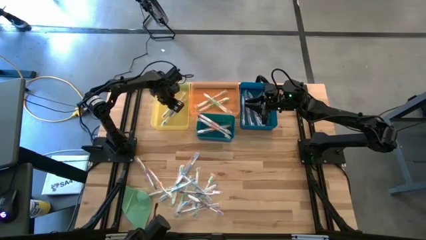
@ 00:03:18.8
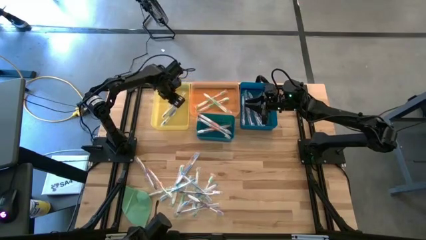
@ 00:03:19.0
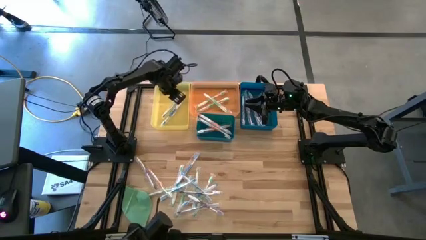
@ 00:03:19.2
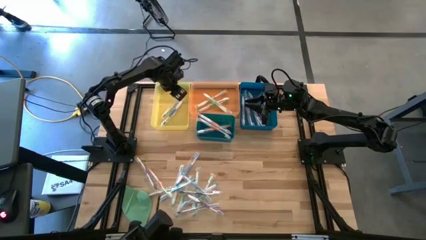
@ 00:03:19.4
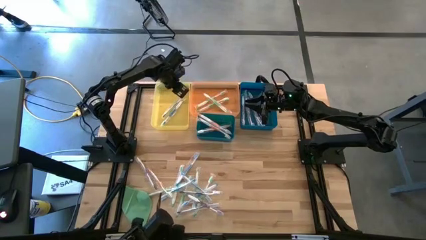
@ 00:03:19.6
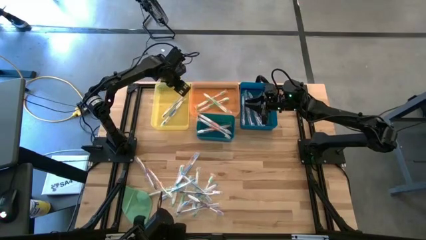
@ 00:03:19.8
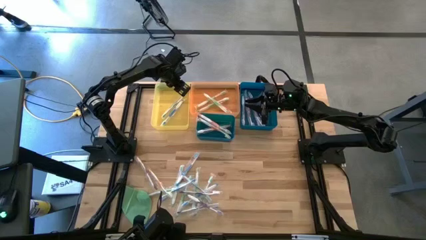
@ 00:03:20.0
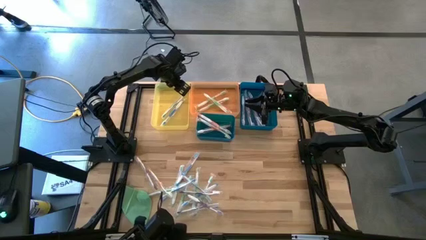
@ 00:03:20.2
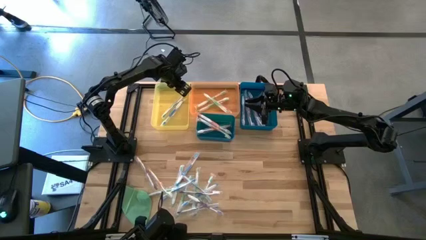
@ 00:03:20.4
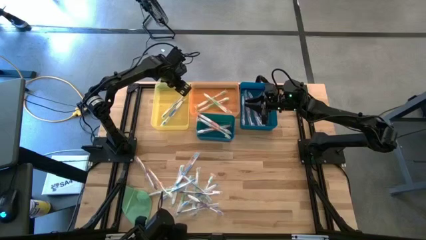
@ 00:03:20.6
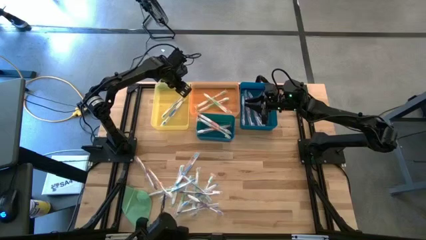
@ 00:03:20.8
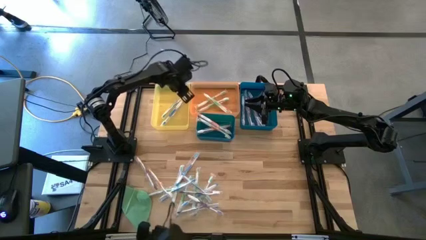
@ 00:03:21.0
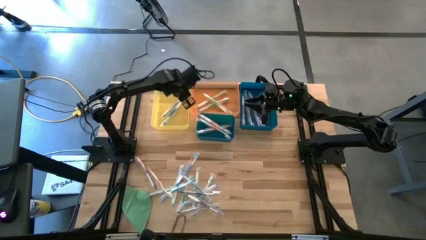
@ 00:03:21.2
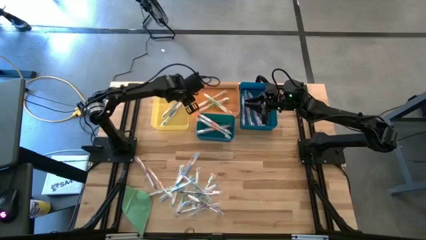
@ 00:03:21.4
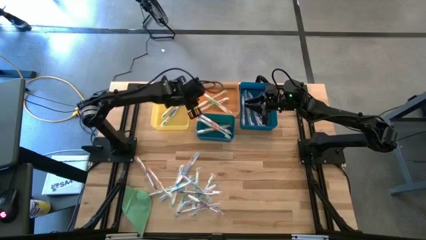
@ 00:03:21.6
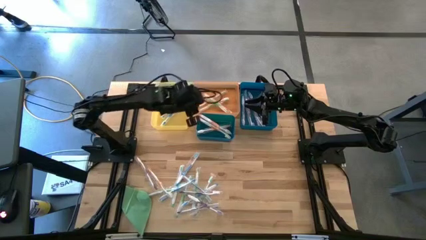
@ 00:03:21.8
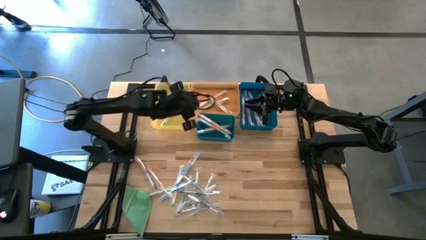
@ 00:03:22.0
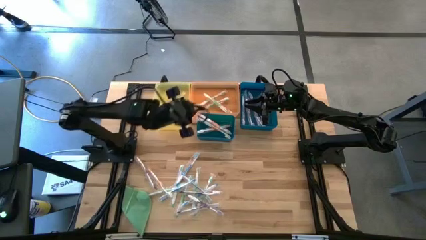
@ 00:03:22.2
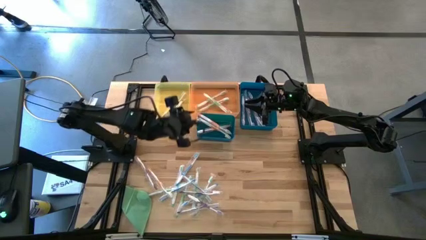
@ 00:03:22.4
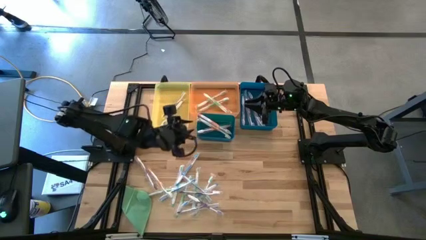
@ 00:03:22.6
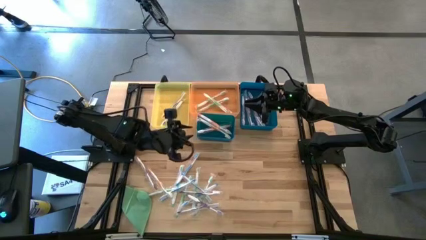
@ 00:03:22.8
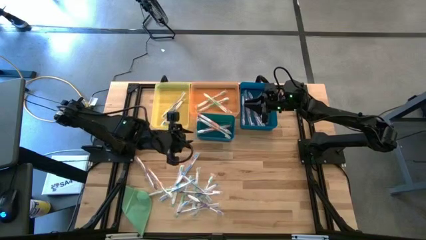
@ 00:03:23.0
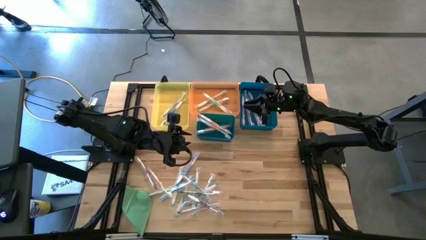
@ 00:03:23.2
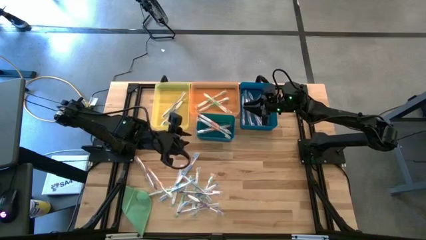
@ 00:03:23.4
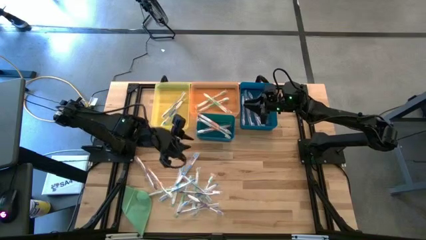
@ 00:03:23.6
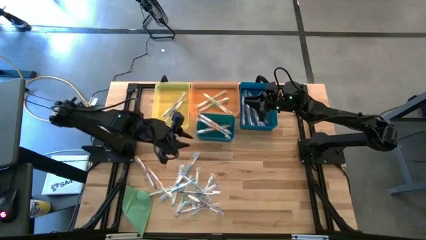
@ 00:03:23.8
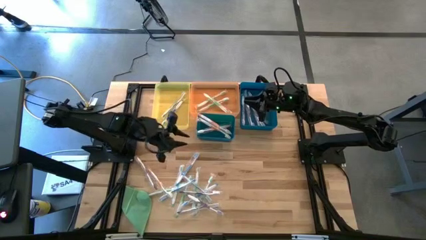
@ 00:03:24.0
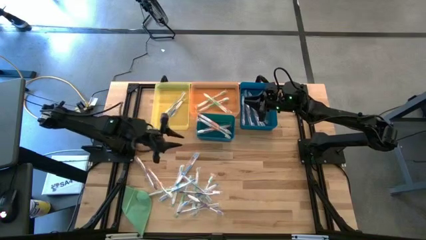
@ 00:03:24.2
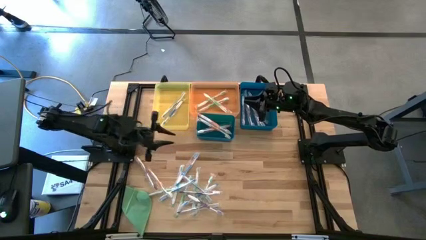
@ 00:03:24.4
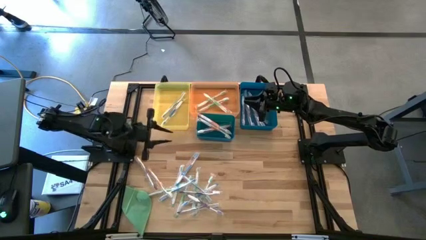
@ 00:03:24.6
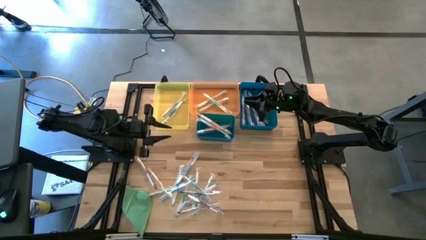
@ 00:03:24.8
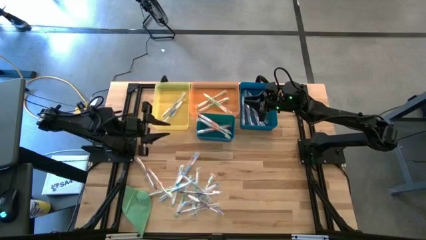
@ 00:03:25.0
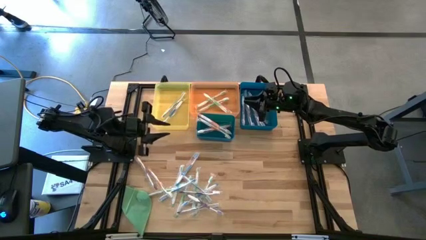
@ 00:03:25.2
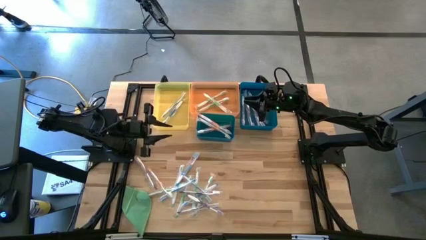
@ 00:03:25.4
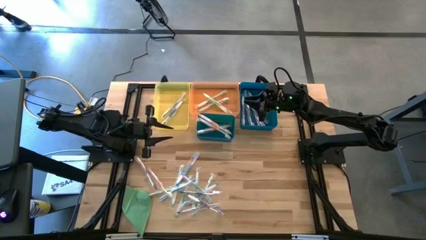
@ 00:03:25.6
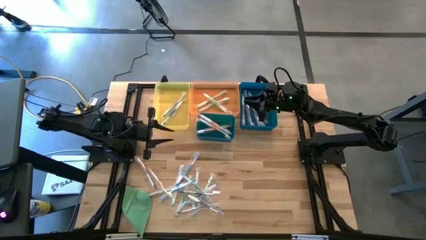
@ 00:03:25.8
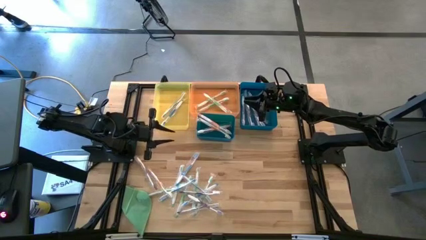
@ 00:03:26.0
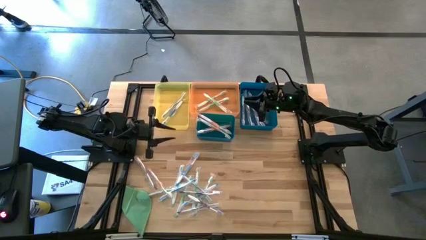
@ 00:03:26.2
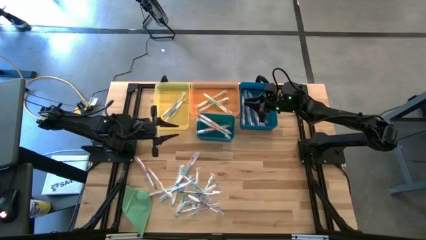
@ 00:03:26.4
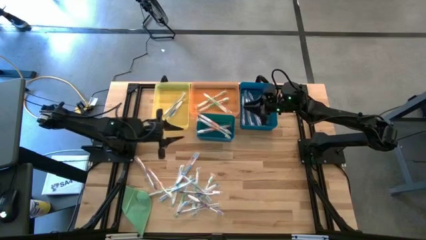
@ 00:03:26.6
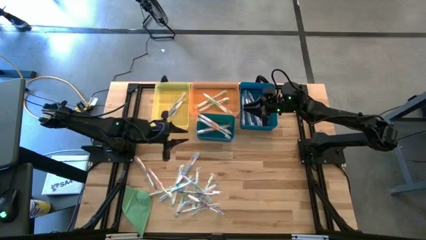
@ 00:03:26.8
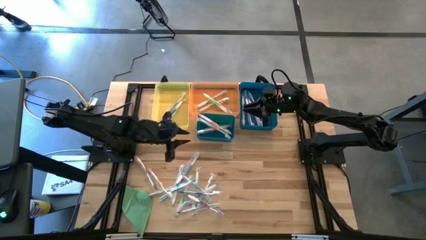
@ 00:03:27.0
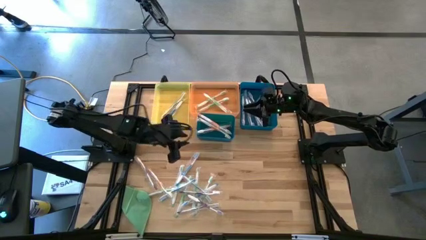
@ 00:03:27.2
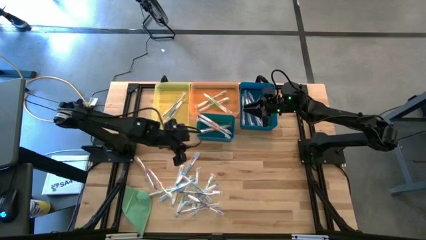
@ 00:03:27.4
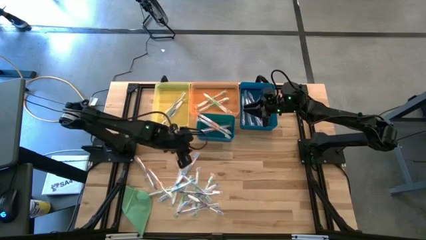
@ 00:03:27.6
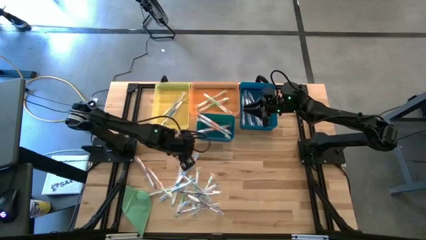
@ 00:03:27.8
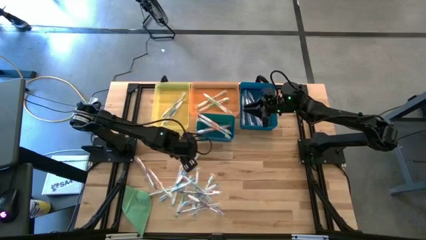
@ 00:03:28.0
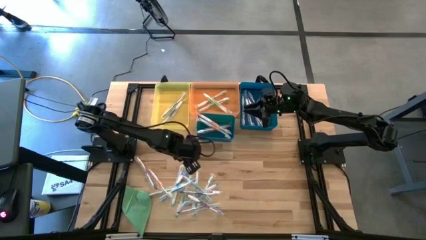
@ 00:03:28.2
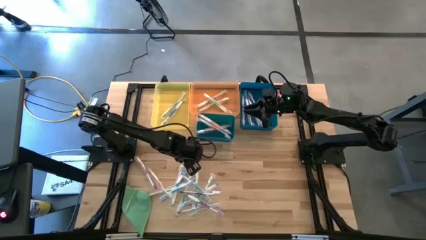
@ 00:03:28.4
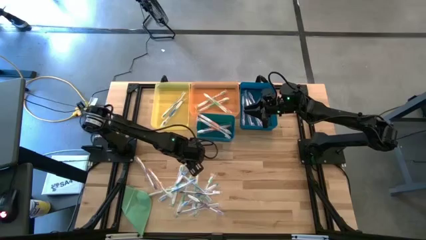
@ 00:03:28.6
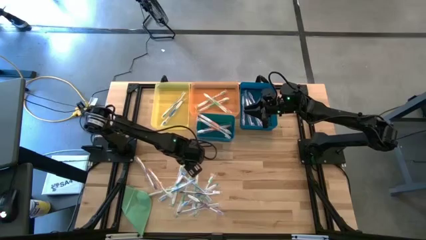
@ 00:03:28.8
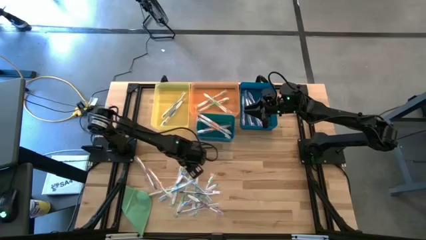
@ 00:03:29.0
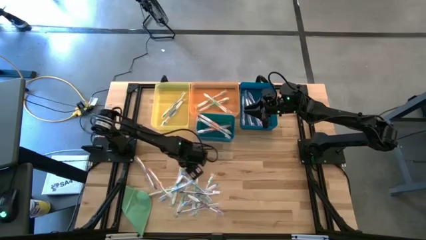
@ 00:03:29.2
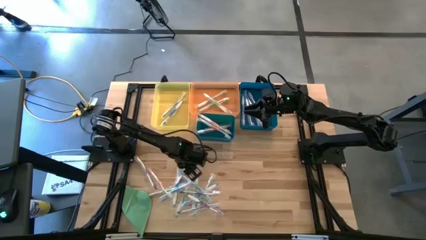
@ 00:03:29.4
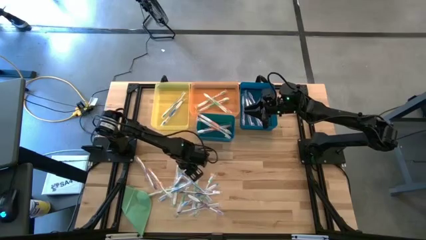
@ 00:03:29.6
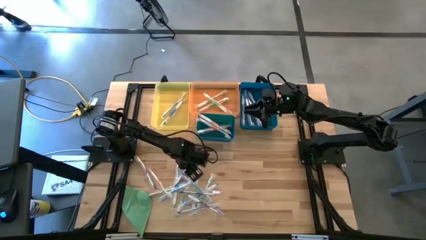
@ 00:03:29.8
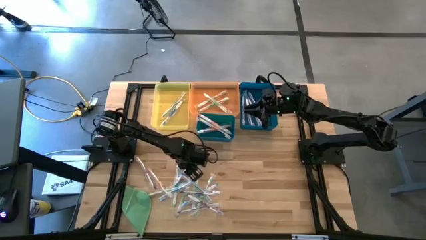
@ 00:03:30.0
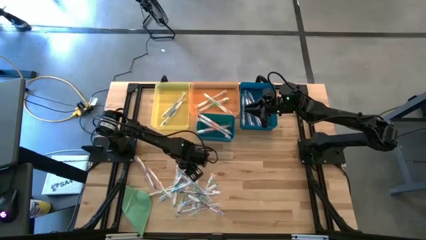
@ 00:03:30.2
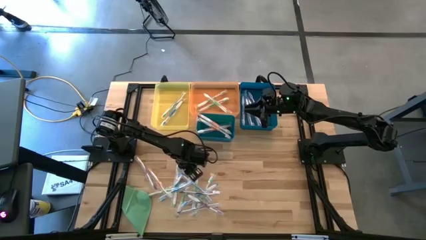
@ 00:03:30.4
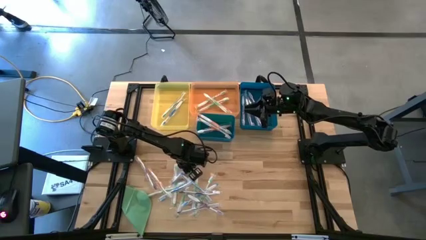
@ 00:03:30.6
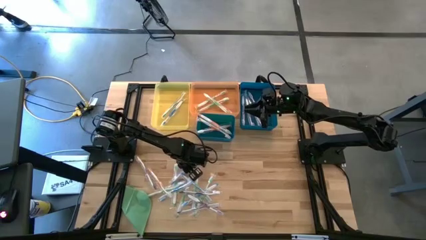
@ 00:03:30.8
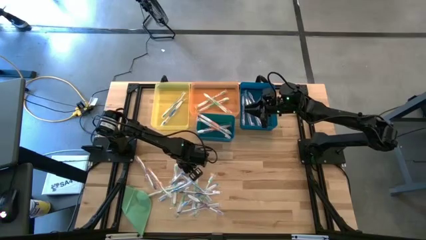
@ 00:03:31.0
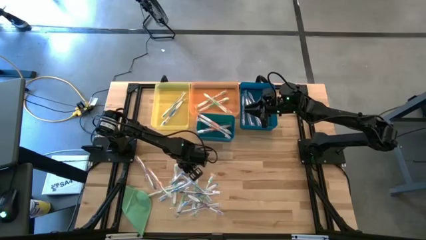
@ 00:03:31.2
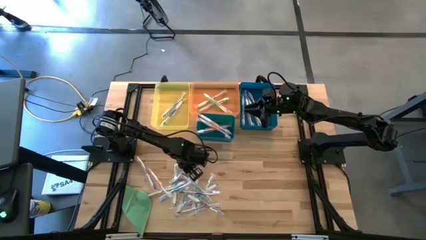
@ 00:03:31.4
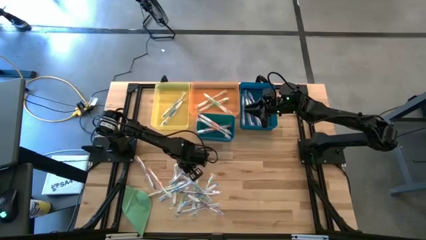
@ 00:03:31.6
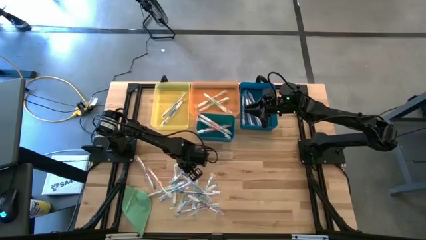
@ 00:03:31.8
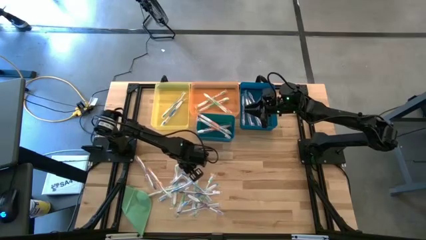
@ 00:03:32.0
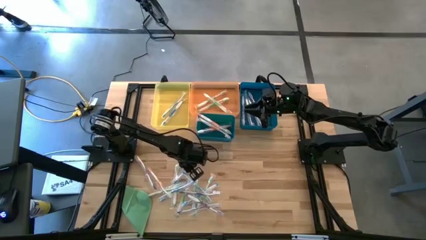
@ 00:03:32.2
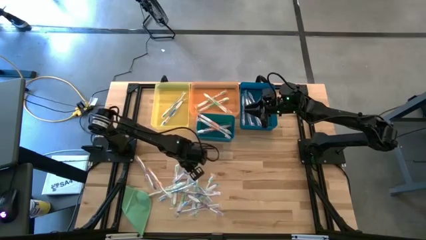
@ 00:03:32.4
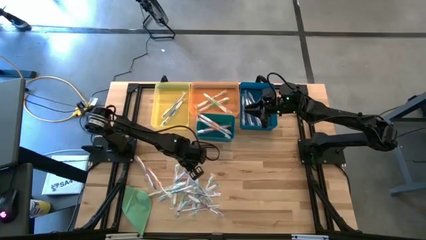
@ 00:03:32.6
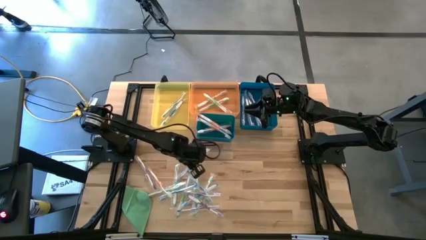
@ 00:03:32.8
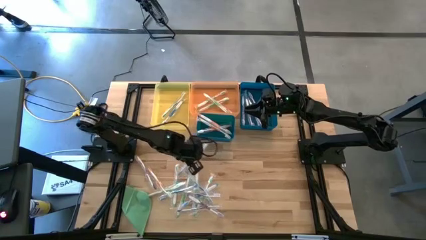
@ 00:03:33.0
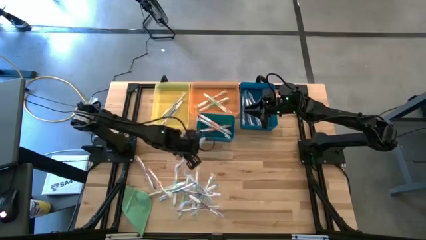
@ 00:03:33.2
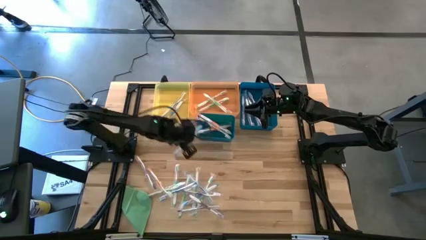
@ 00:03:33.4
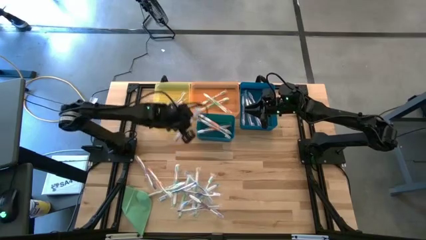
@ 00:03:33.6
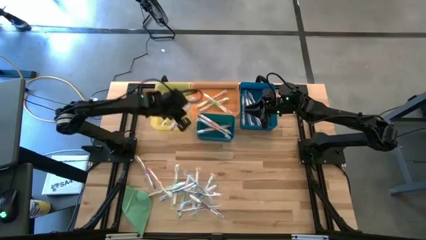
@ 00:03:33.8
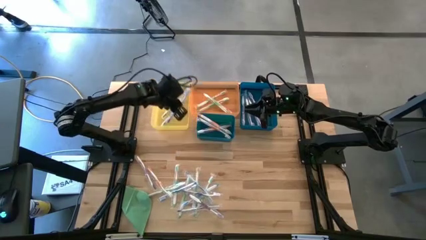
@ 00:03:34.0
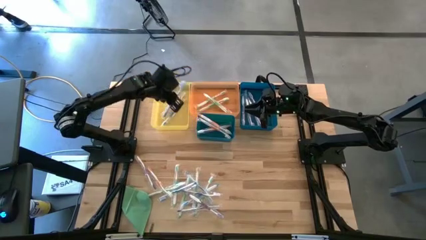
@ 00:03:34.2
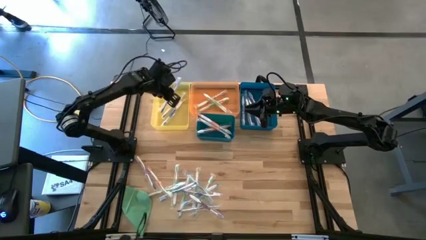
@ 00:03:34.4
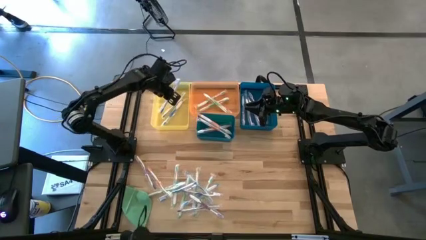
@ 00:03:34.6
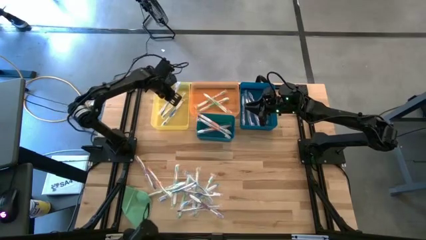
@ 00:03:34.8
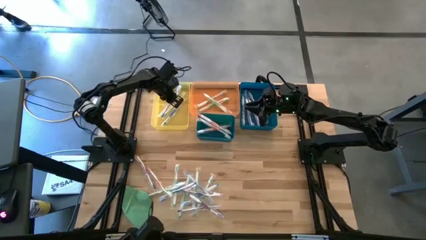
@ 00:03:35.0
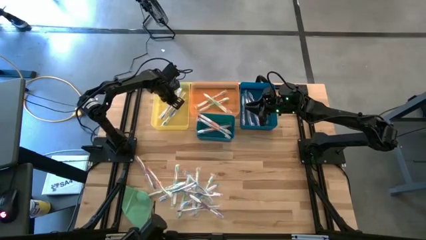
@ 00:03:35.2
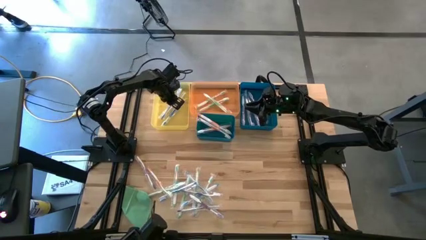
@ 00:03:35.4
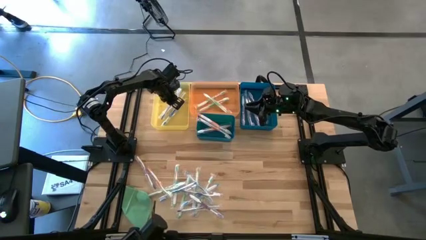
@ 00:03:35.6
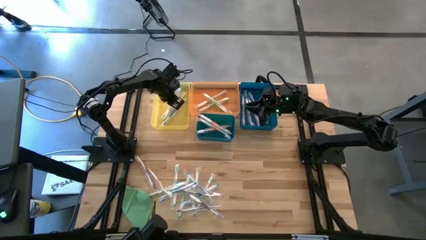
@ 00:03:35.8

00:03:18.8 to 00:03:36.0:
Task: Pick & Place Toothbrushes
Put the blue toothbrush into the yellow bin
